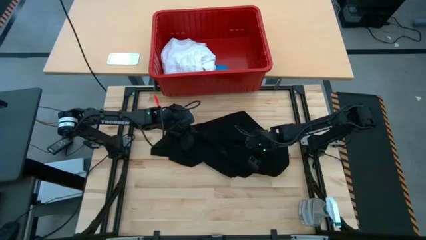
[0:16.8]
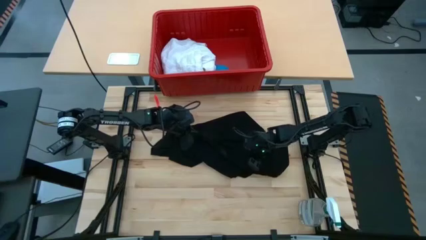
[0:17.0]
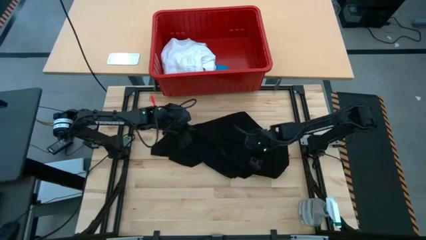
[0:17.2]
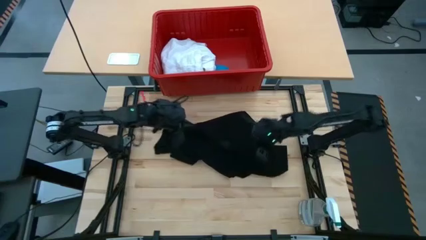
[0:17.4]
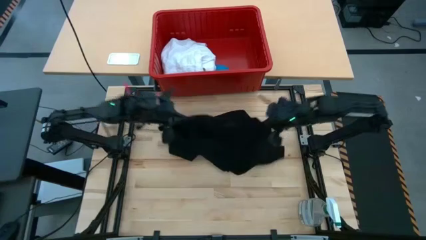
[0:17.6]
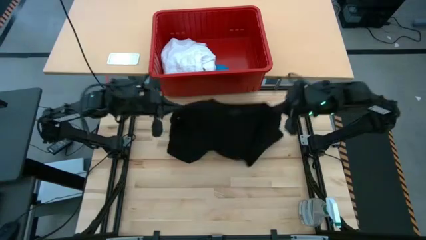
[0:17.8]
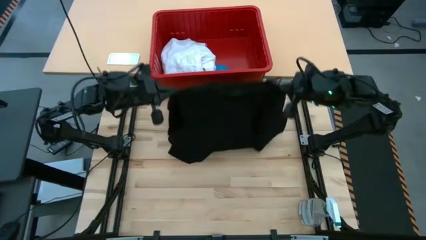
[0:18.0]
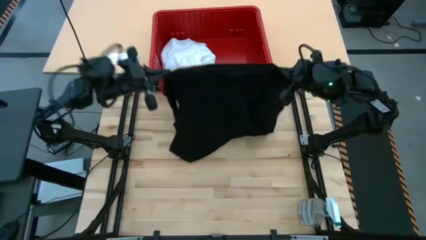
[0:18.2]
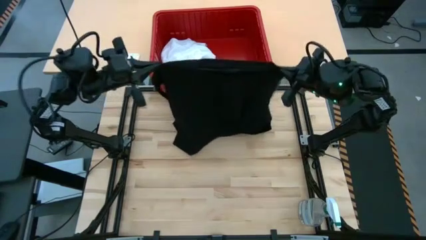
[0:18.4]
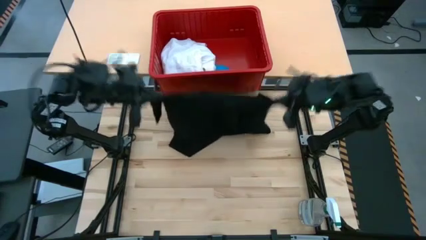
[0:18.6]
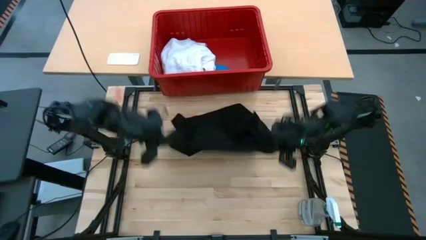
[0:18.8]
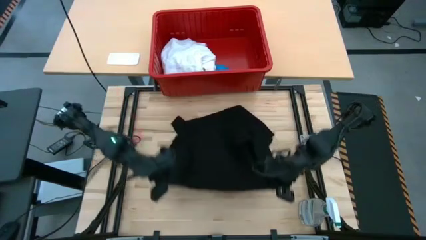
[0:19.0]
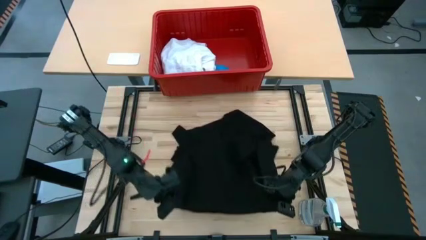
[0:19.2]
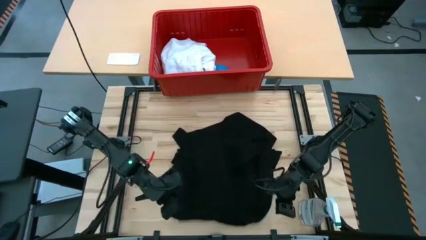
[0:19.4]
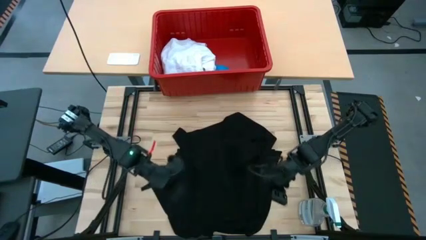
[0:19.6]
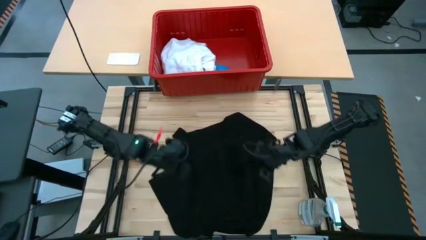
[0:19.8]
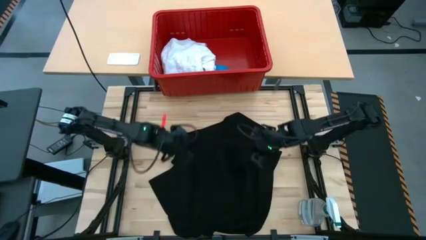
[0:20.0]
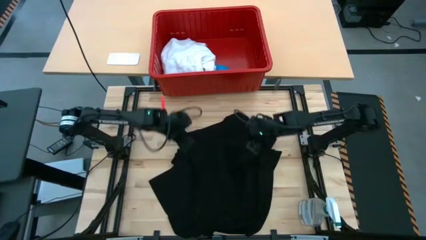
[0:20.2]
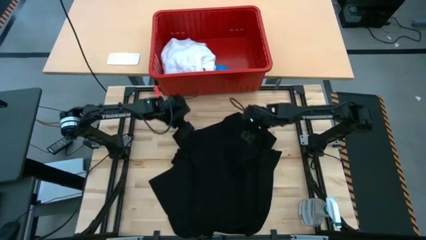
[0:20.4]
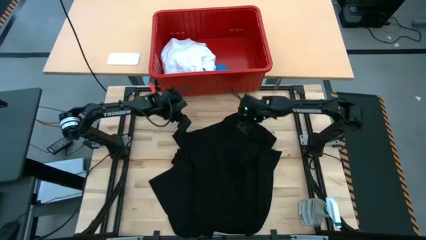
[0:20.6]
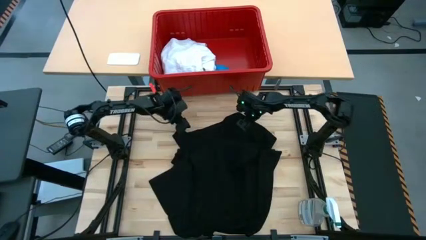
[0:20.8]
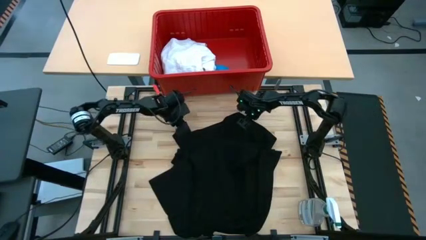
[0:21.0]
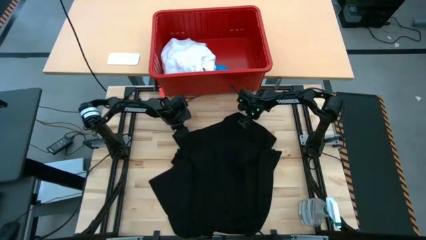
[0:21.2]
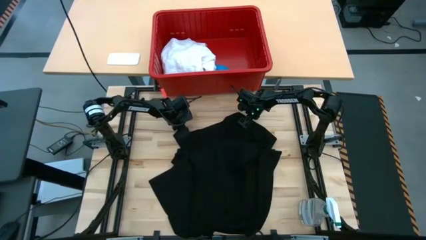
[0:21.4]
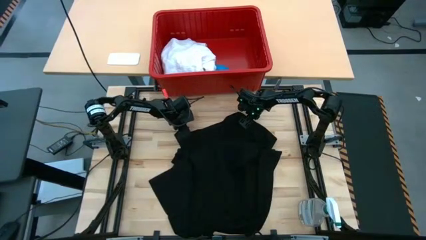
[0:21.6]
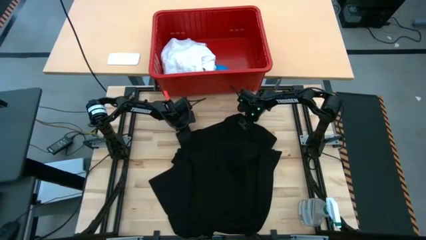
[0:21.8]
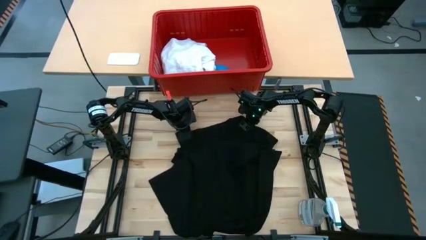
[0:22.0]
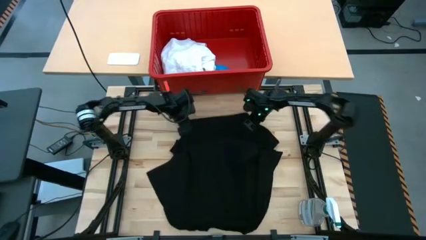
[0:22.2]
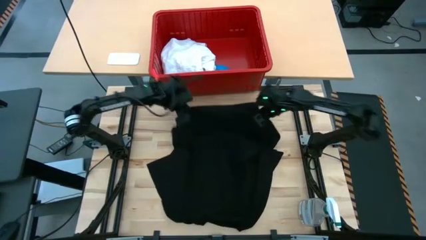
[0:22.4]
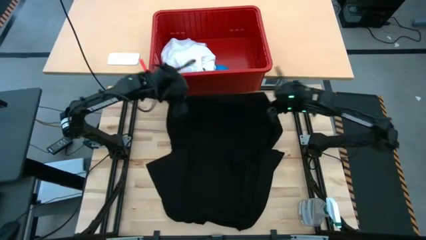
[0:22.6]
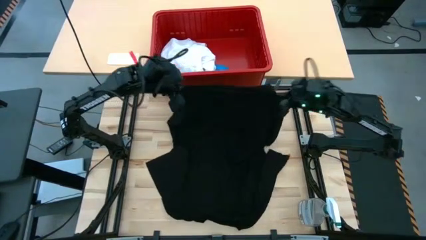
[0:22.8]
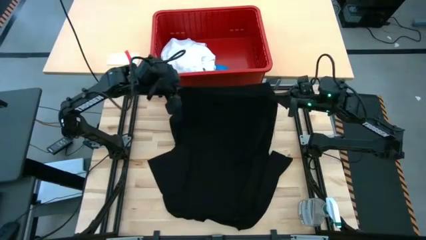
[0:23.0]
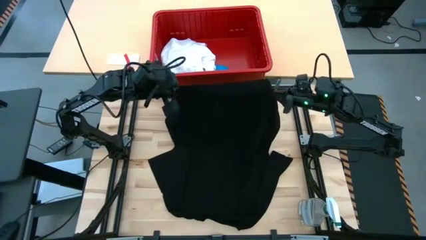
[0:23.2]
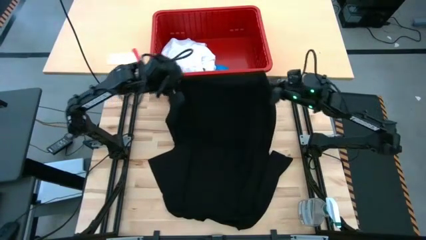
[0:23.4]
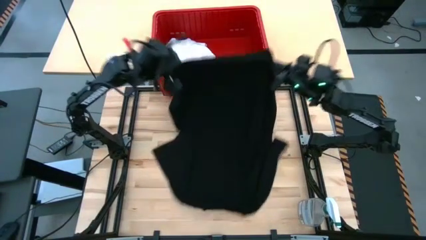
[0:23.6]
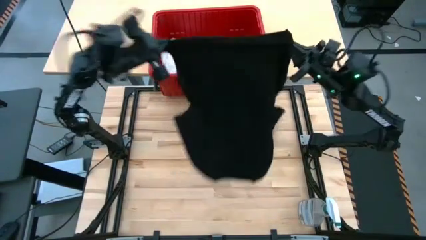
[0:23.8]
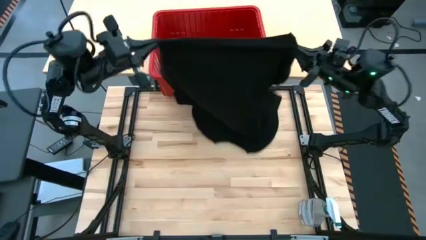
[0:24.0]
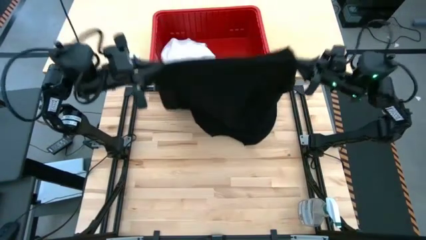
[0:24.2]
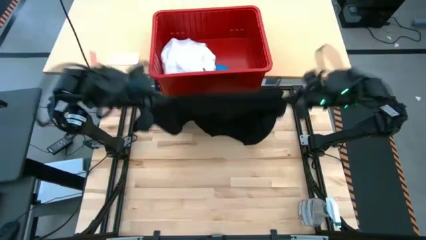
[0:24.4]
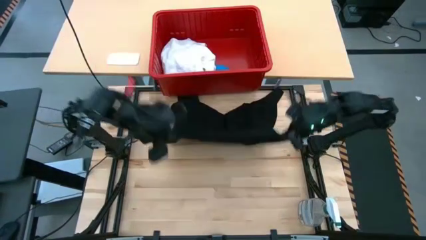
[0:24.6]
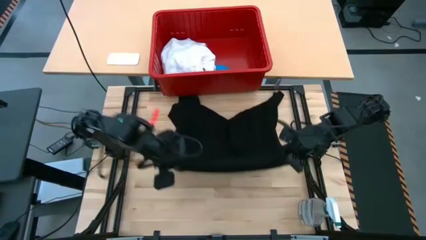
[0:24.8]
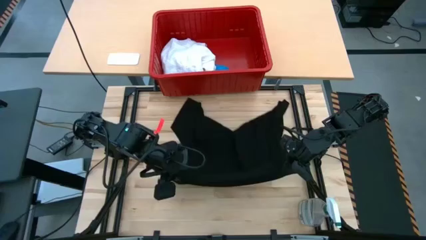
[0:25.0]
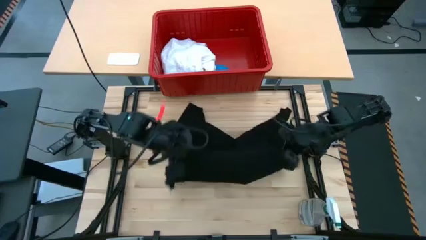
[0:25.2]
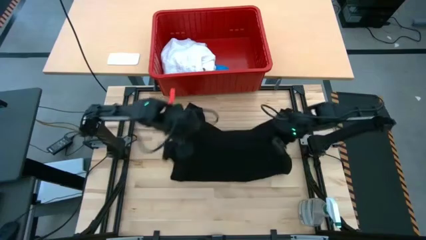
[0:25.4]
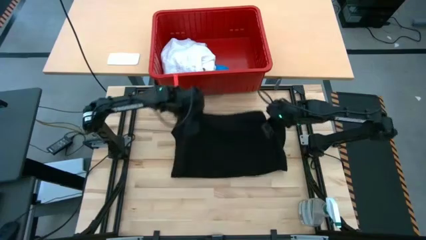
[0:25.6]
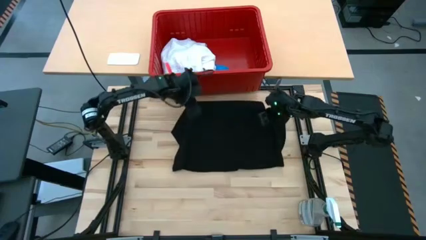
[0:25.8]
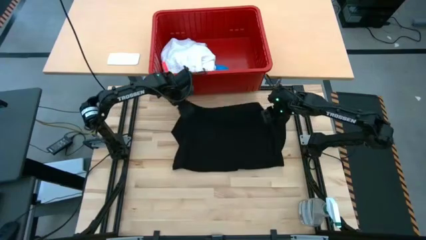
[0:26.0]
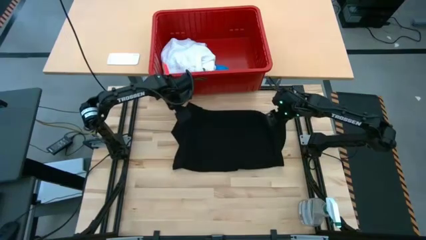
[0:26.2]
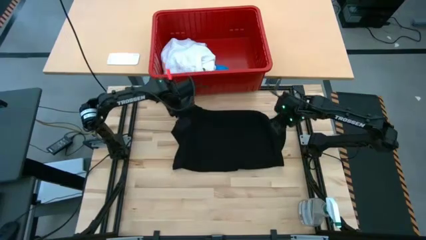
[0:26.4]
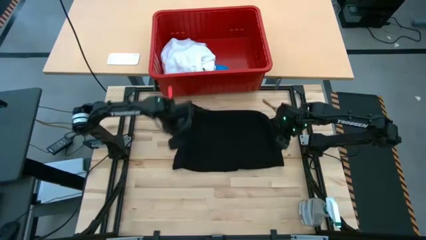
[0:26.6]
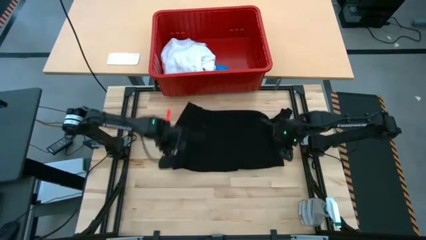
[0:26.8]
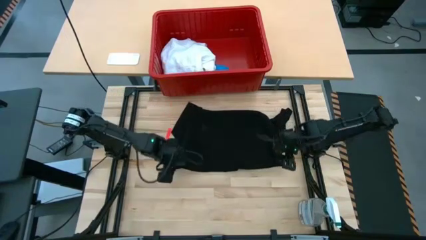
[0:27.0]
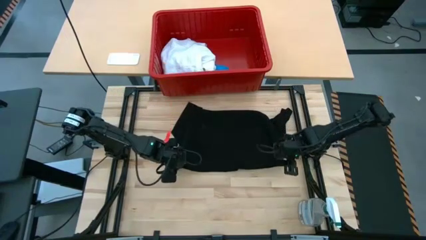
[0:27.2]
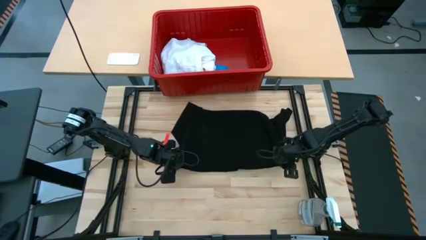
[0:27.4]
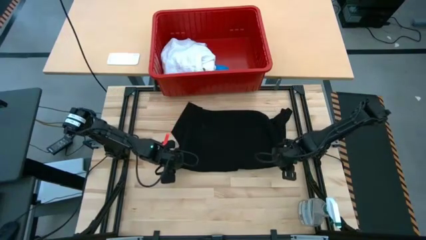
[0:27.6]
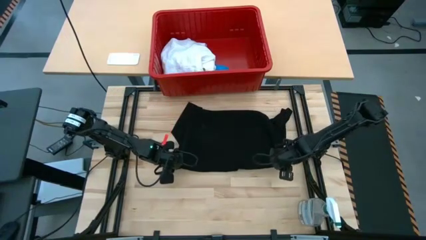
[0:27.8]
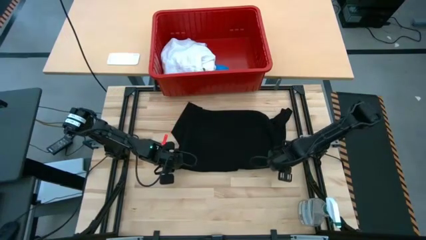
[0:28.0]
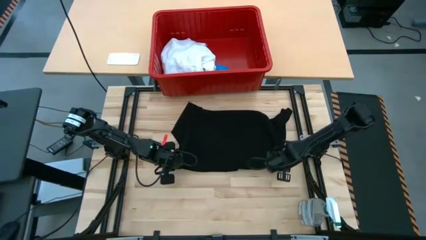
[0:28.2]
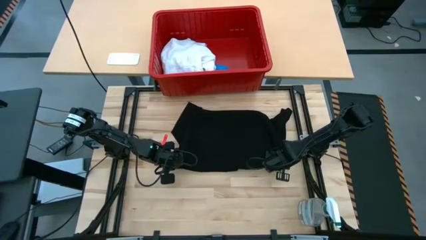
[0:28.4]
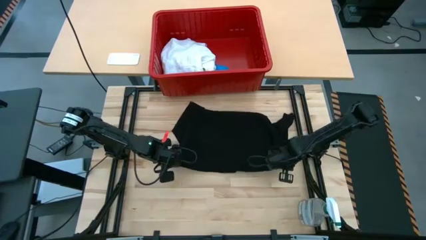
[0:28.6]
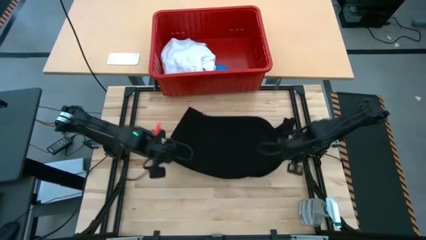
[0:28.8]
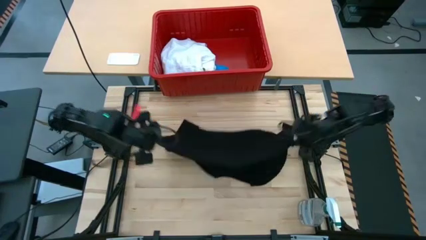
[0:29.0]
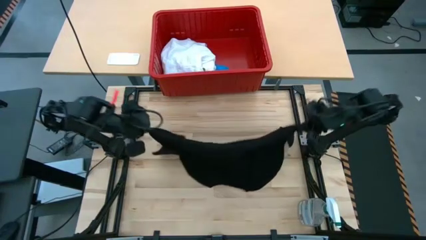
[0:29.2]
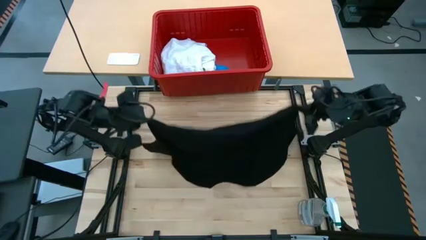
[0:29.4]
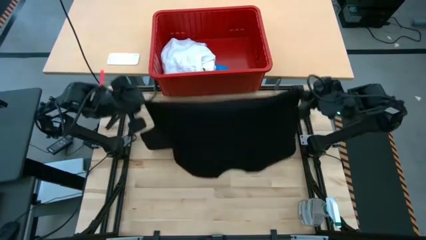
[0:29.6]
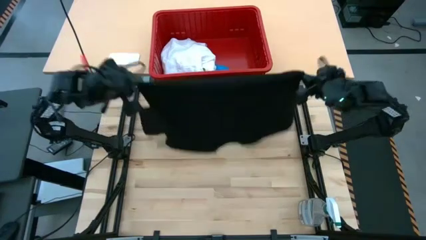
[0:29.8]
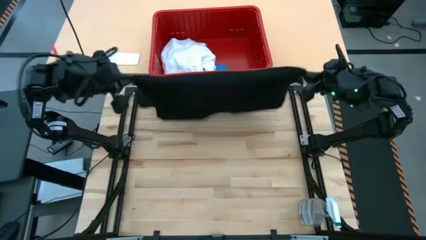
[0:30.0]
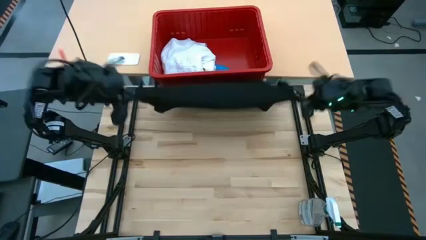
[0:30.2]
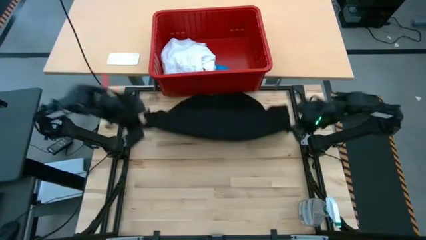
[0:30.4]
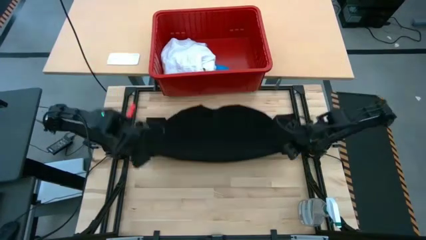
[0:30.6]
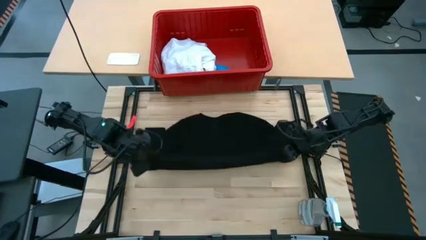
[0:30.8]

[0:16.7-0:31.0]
Task: Fold laundry
Fold the black shirt

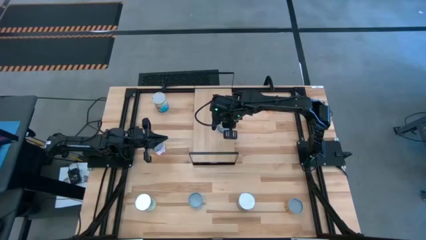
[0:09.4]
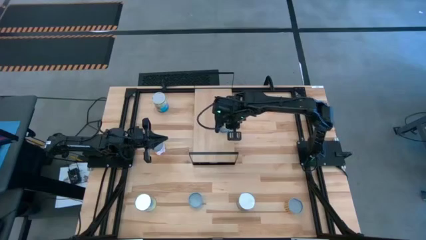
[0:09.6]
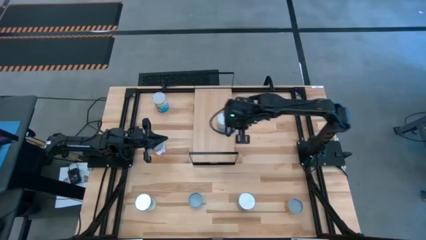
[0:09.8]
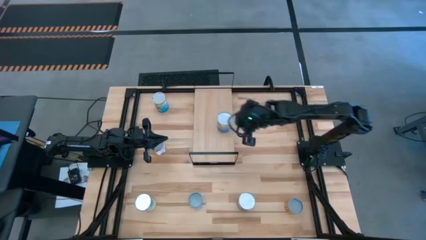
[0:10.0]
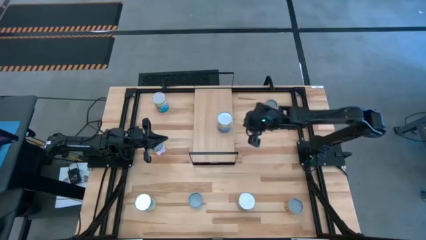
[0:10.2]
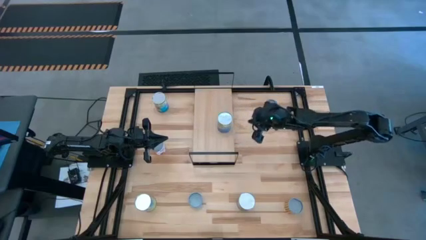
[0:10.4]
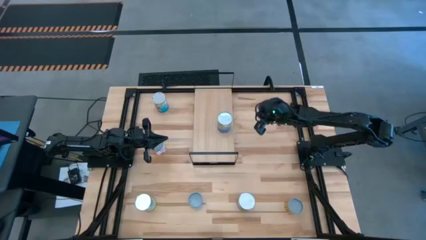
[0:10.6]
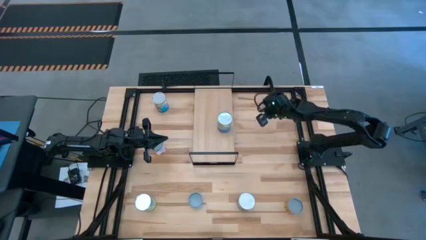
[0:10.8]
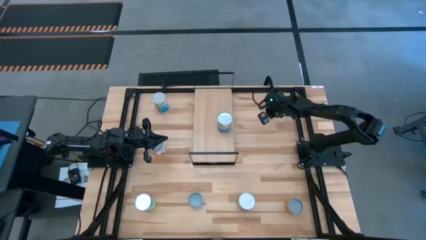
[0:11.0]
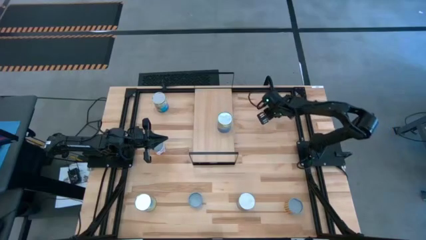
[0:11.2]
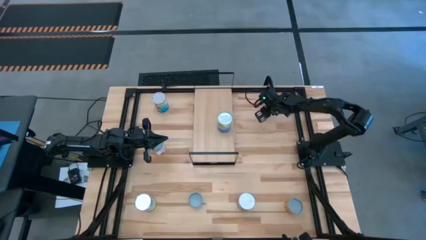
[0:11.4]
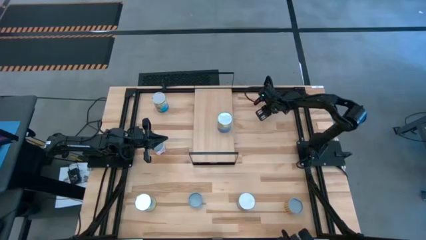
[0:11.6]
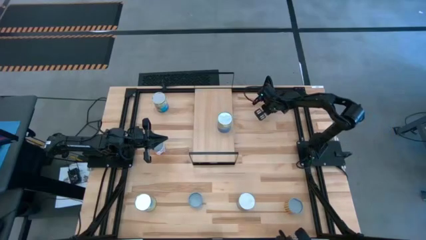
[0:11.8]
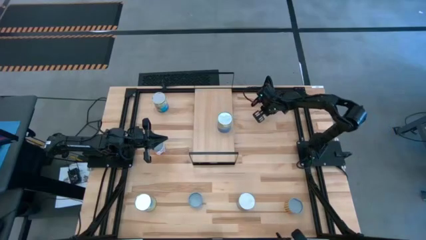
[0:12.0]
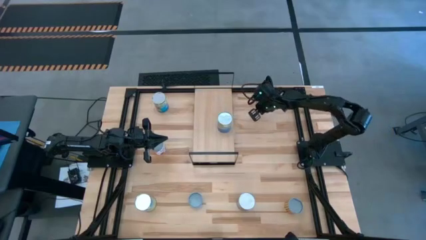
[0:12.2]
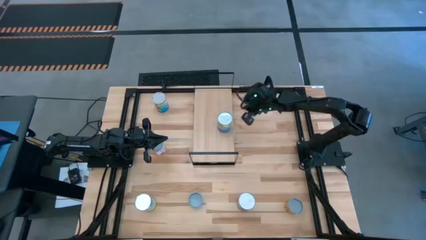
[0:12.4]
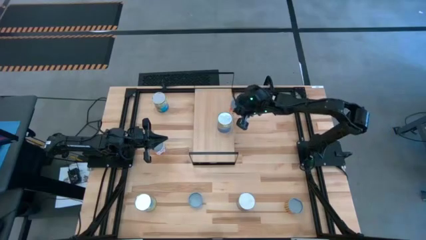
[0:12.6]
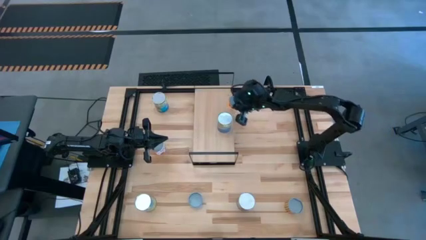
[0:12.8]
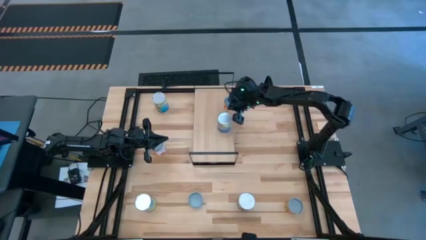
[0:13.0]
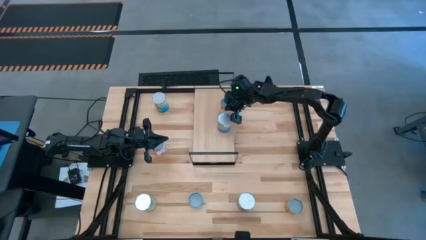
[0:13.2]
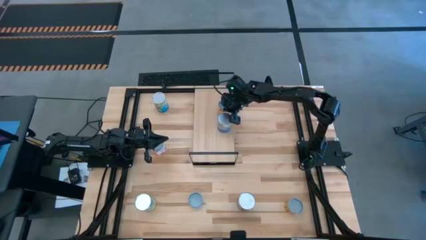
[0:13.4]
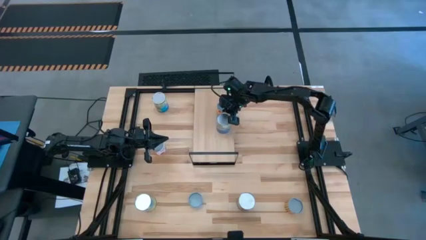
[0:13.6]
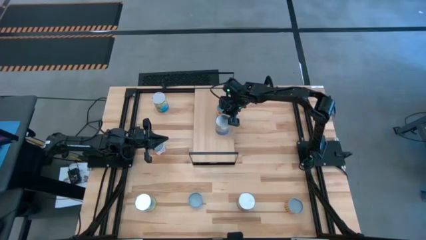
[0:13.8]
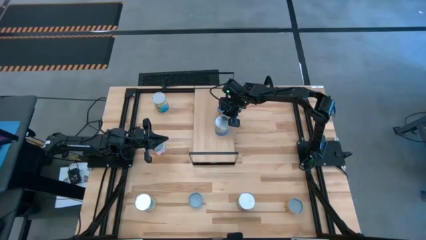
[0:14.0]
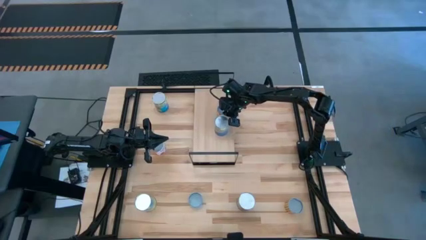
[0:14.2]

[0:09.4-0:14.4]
Task: Pick and place cans onto a shelf
Put the canned pineapple on the shelf
